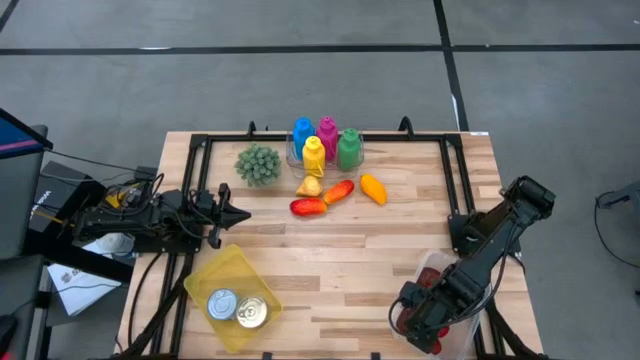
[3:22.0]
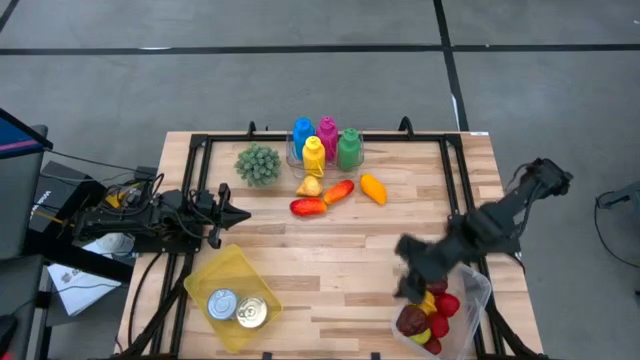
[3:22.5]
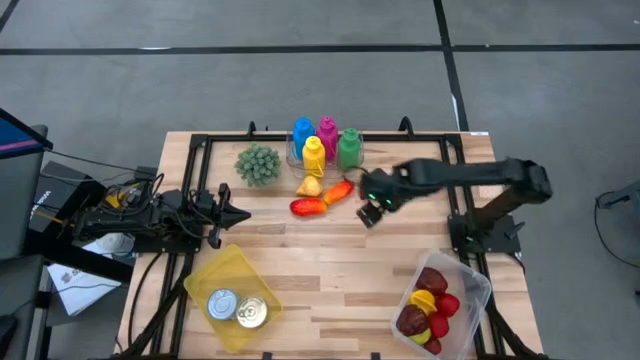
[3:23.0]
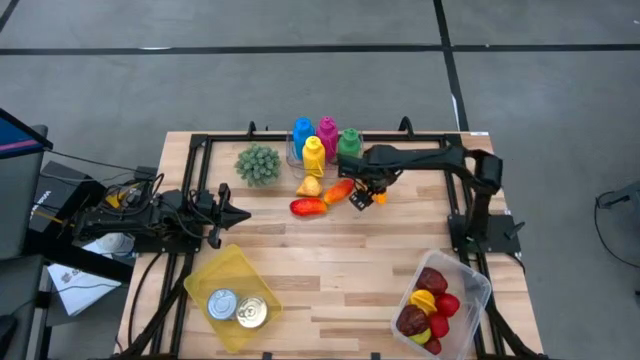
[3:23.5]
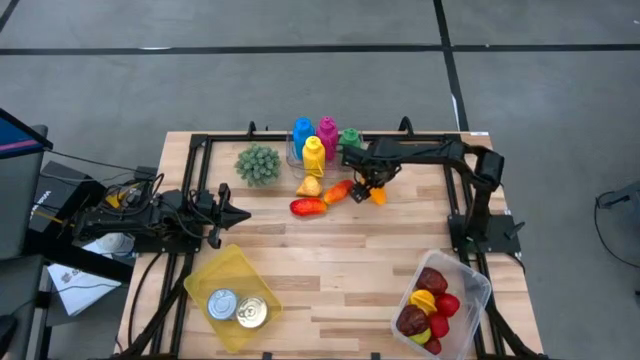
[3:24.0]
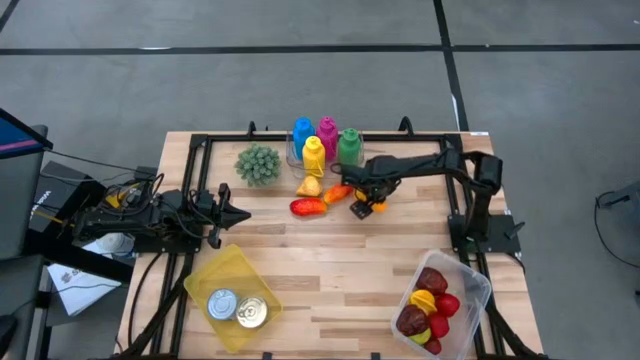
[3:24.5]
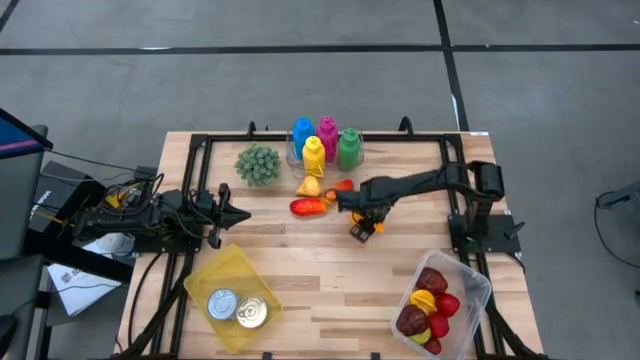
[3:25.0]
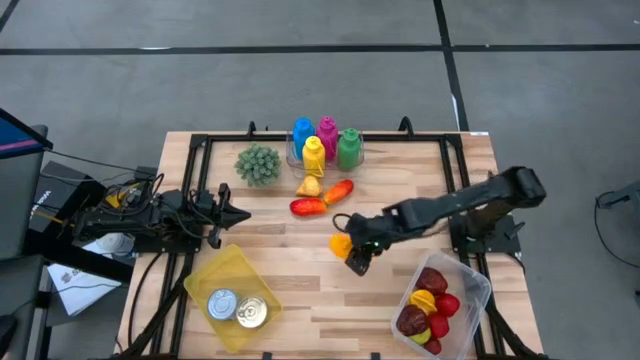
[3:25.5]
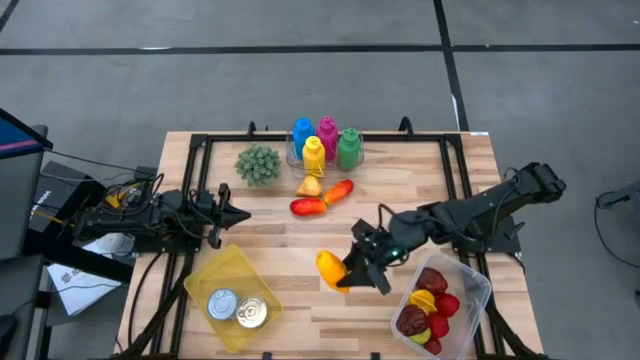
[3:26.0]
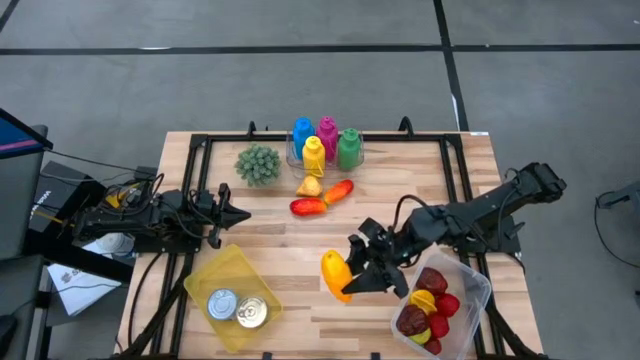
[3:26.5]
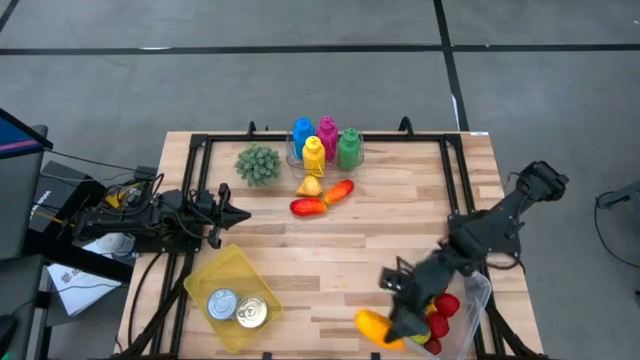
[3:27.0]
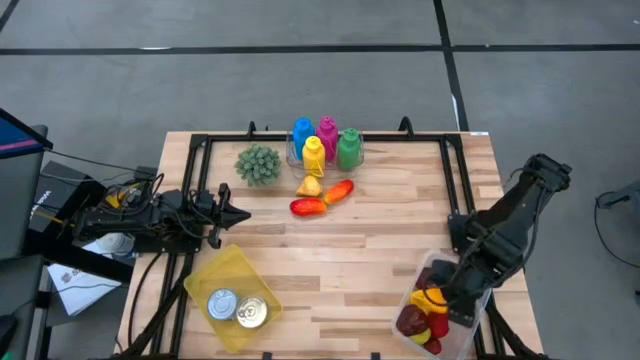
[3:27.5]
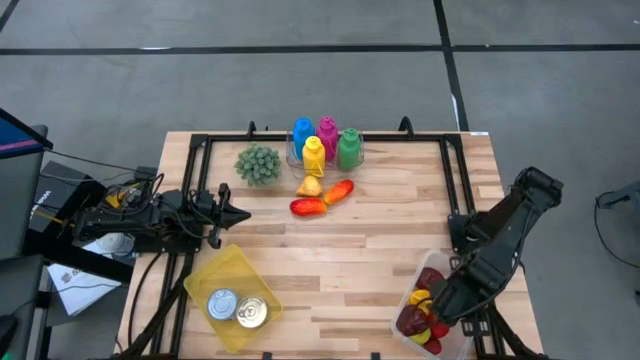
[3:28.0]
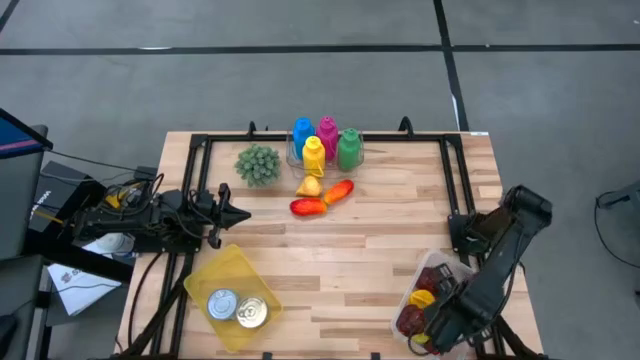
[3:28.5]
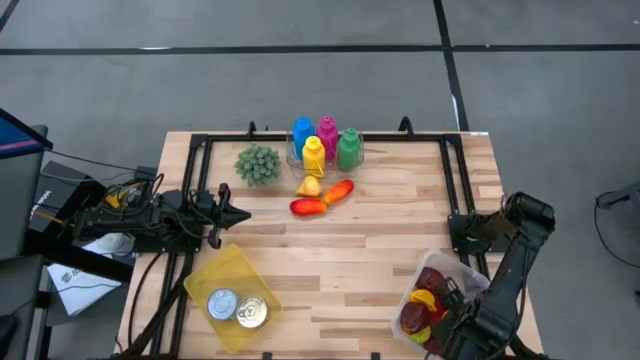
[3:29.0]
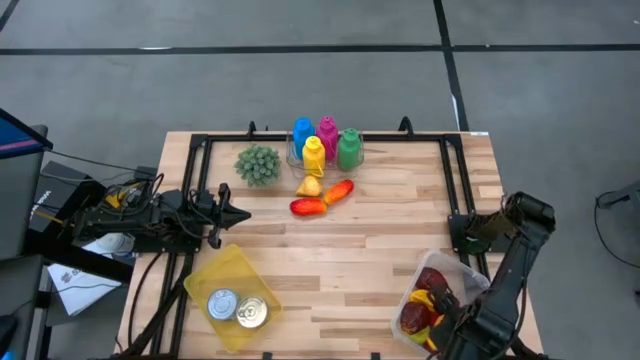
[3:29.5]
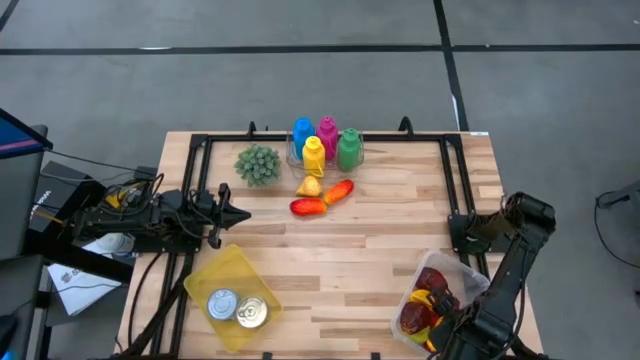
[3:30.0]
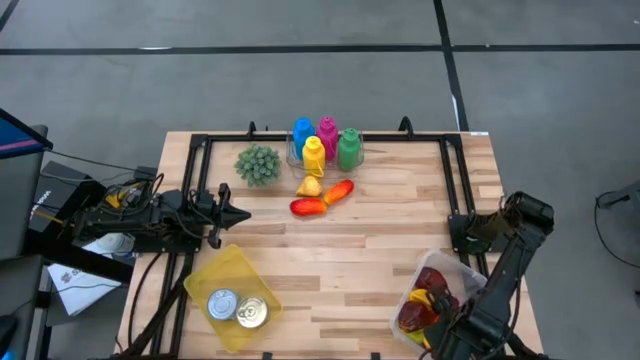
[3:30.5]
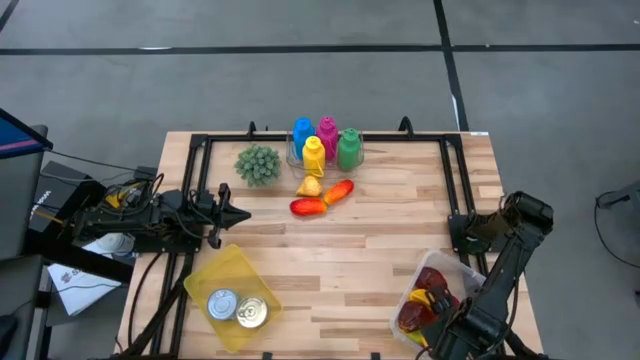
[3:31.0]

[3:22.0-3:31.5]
Task: Pick & Place Food Item
Put the yellow mango into the white bin

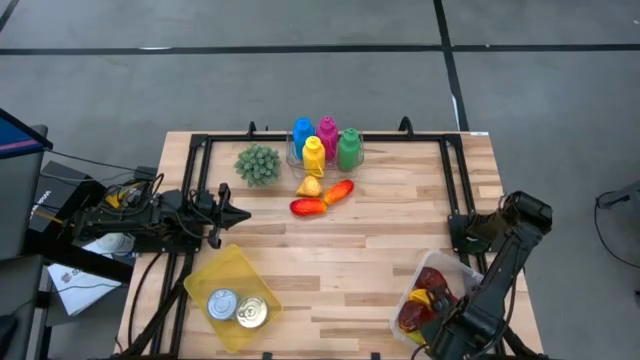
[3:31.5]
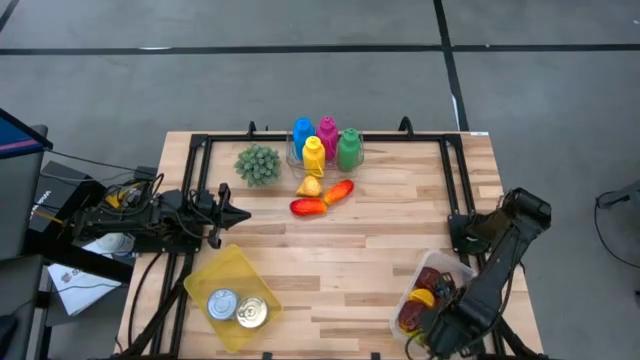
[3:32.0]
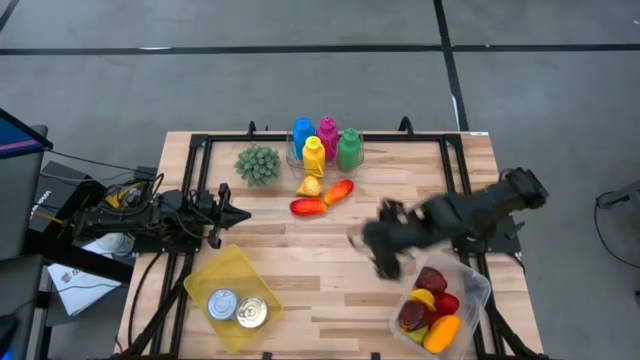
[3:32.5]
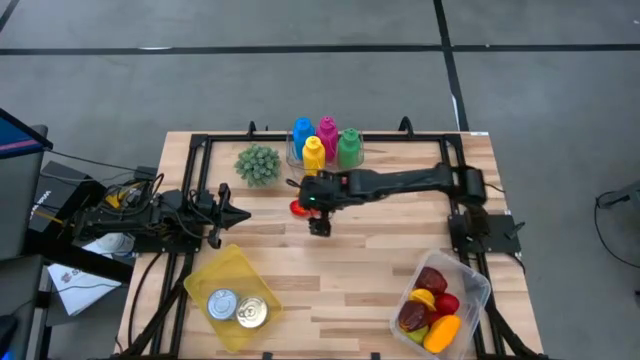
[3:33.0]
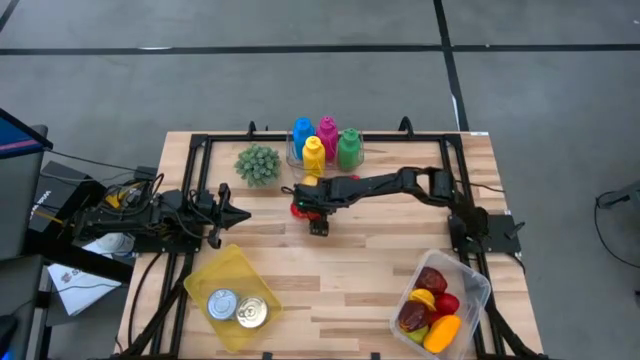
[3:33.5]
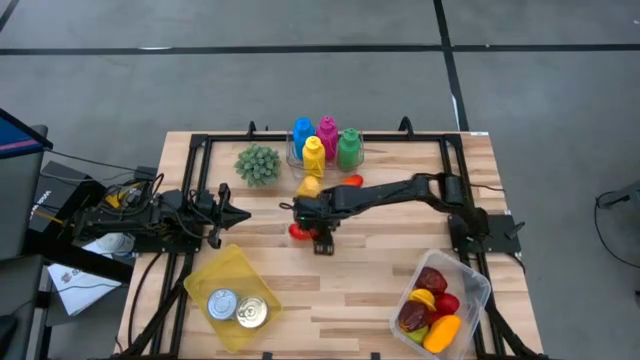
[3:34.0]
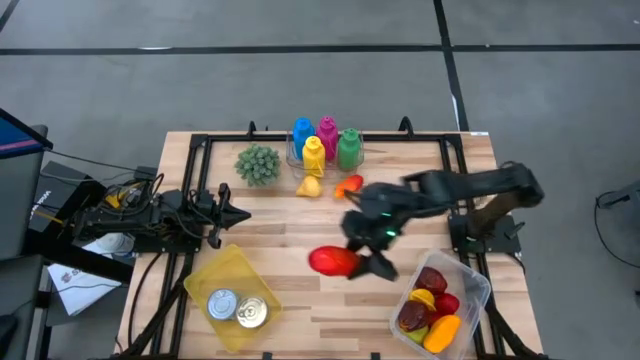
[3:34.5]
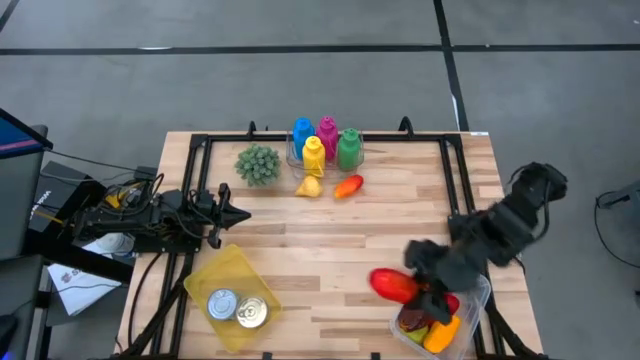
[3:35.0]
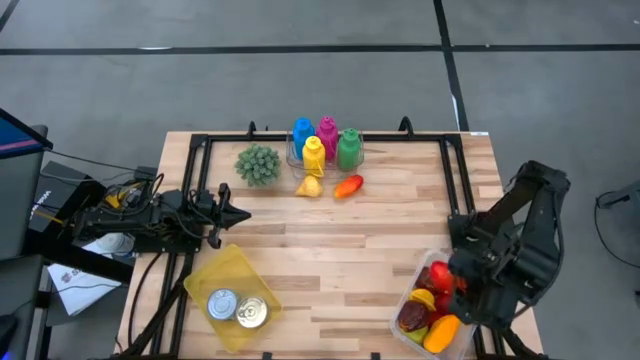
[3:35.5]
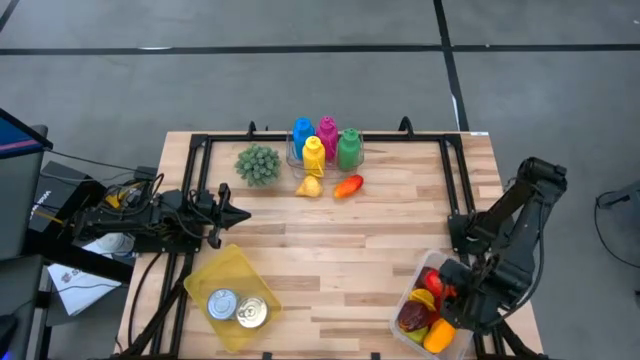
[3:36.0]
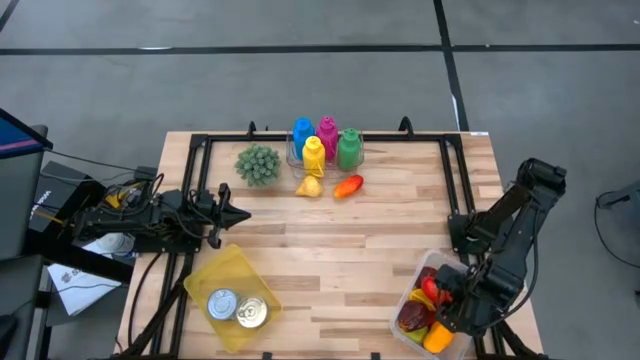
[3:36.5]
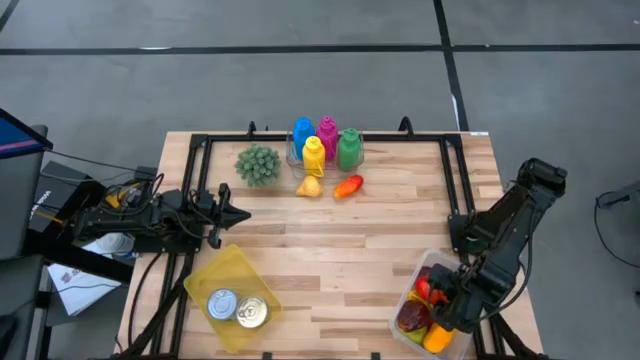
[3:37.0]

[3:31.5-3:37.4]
Put the left red mango into the white bin

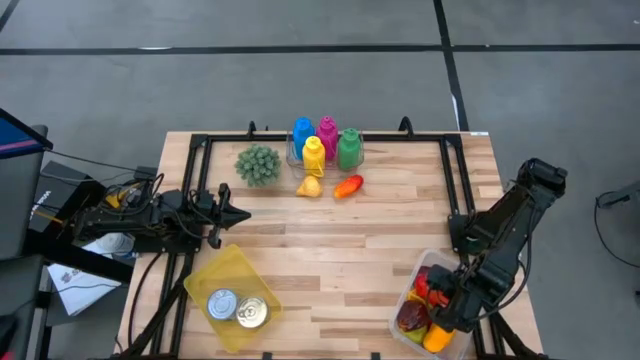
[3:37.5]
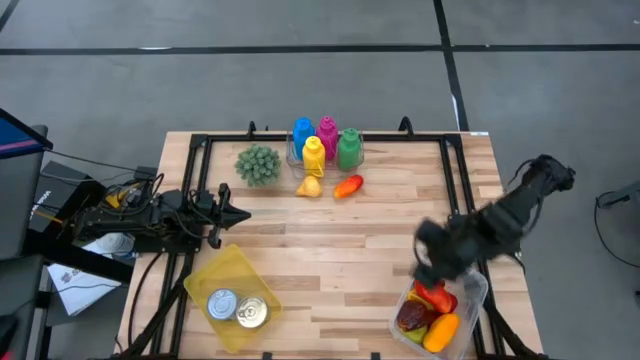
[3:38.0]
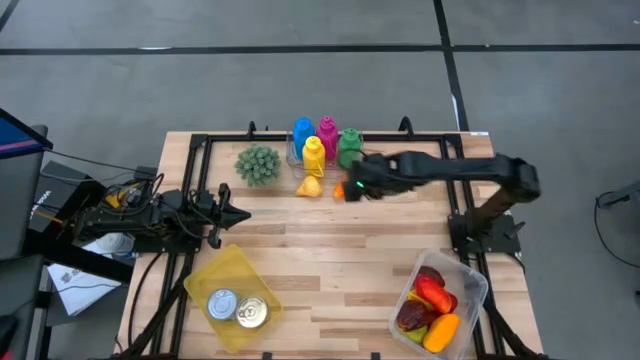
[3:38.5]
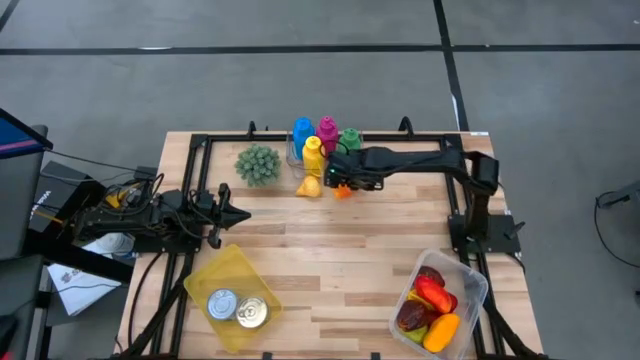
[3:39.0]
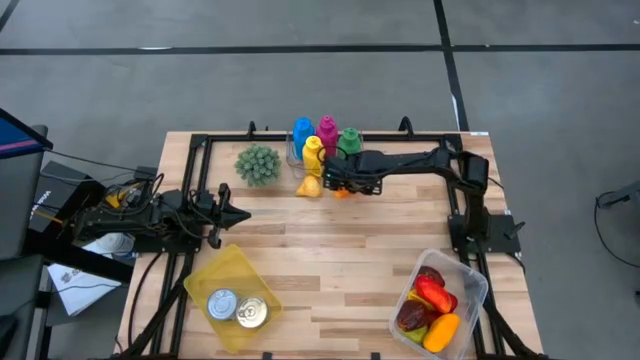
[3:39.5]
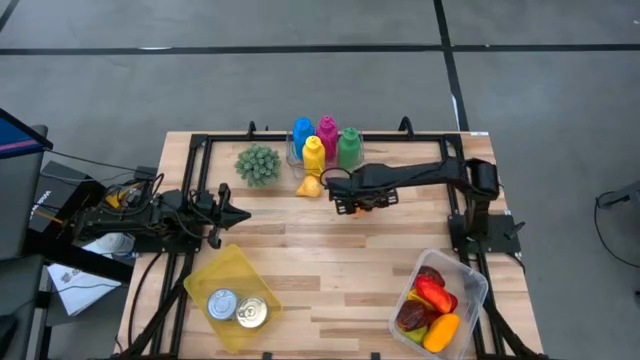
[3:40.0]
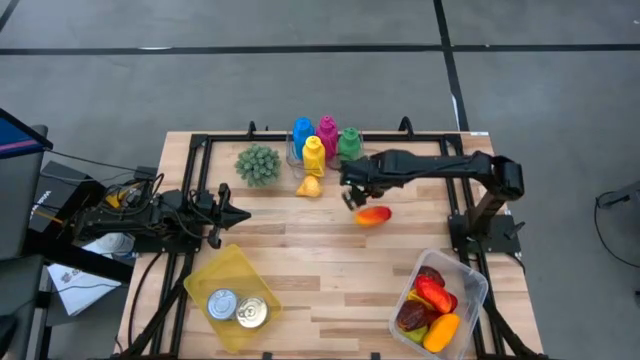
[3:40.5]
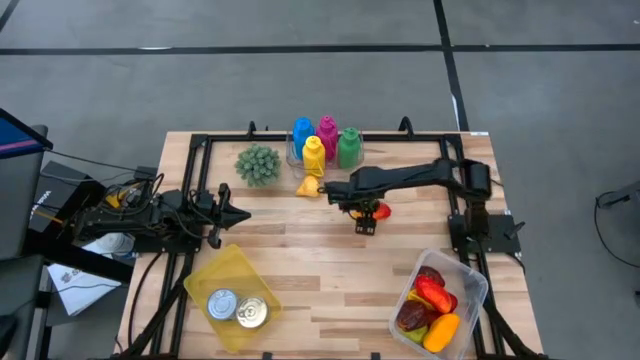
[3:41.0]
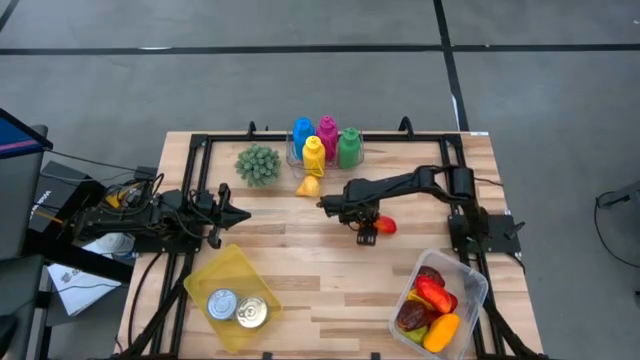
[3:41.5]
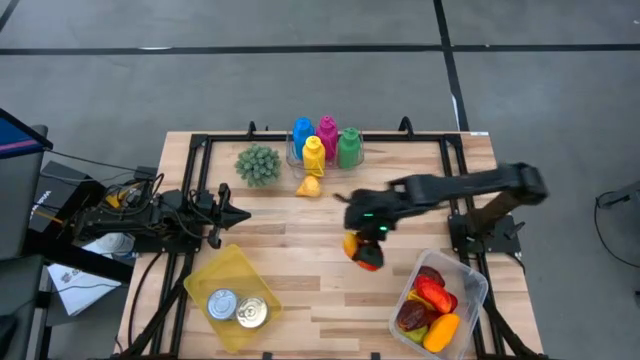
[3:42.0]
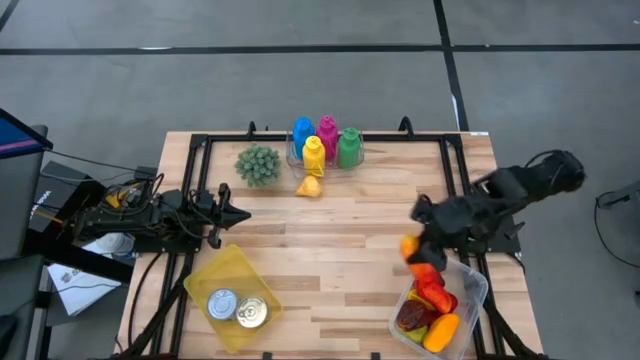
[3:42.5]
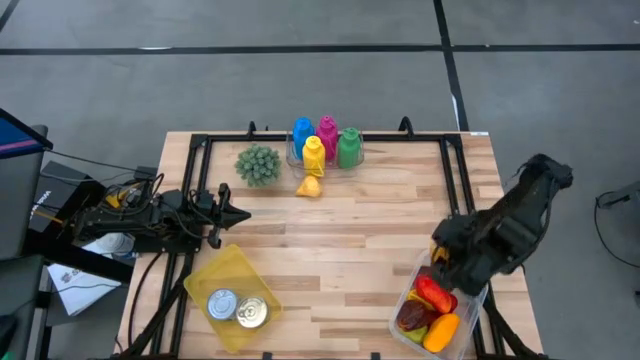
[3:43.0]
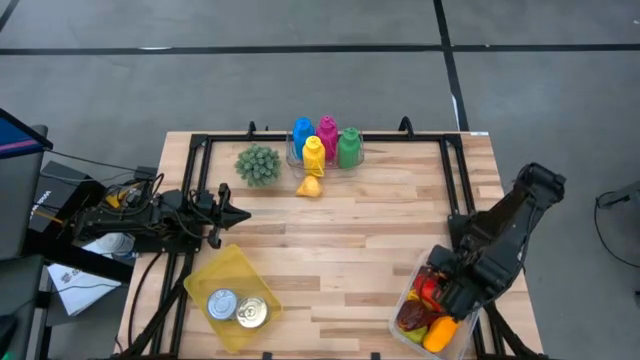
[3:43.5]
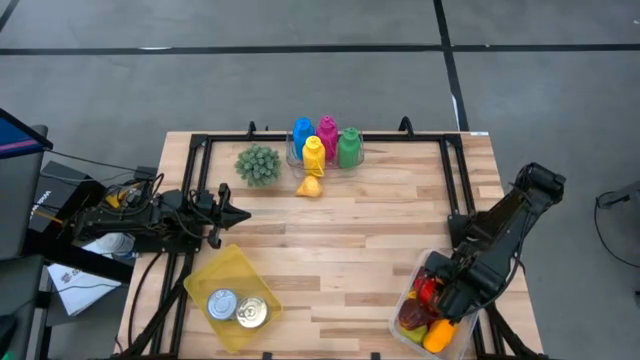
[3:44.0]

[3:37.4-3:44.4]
Put the red mango into the white bin

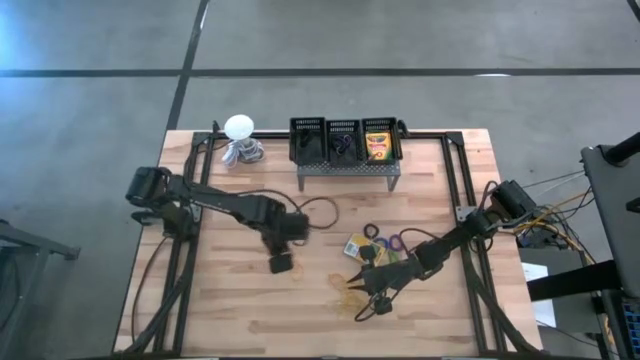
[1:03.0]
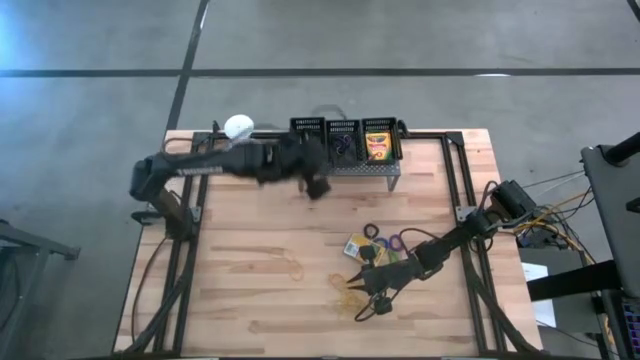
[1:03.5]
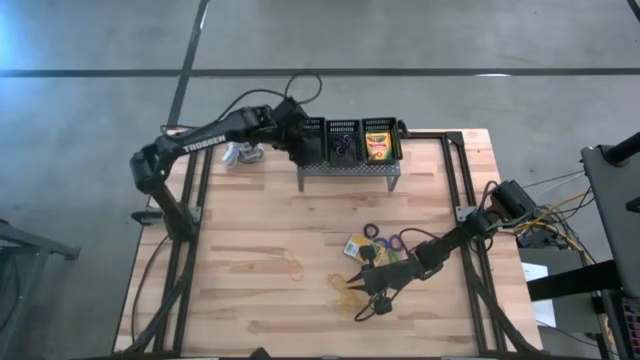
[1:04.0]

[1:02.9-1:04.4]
Task: Pick & Place Office Desk Supplies
Put the black rubber band into the left black bin on the shelf
